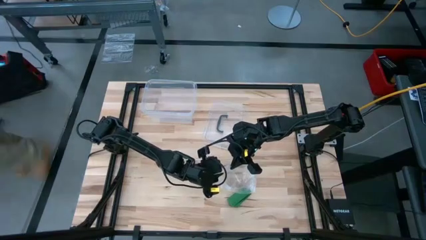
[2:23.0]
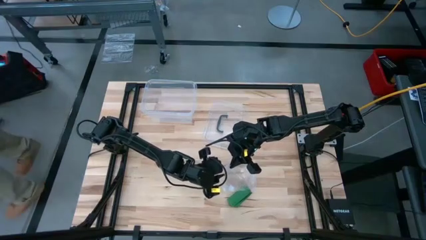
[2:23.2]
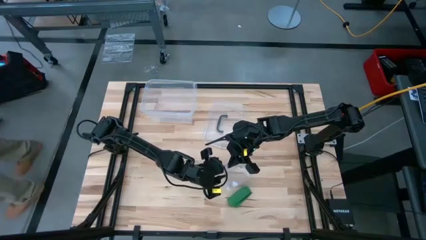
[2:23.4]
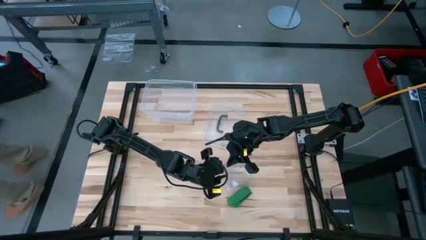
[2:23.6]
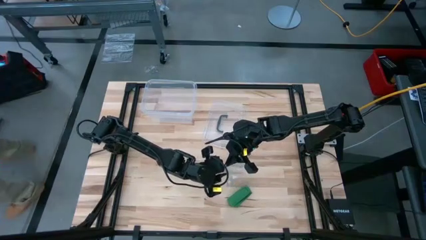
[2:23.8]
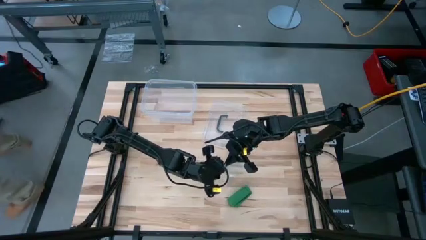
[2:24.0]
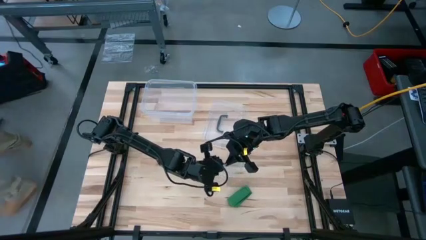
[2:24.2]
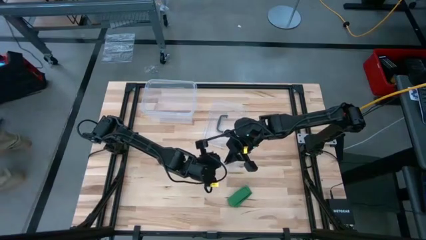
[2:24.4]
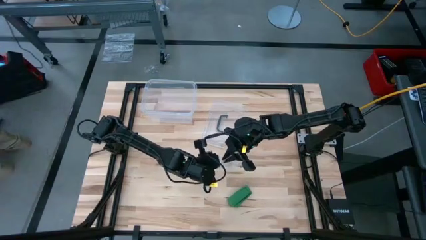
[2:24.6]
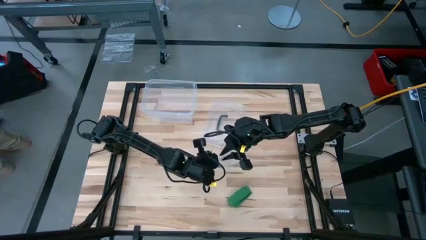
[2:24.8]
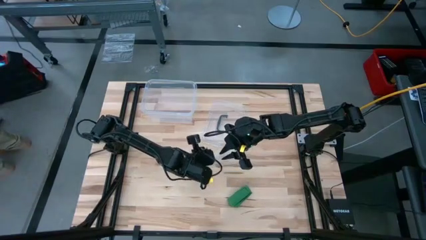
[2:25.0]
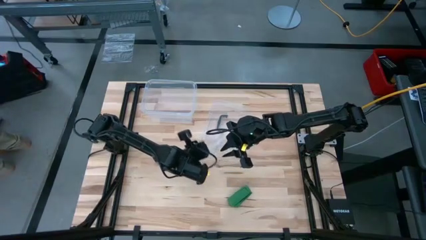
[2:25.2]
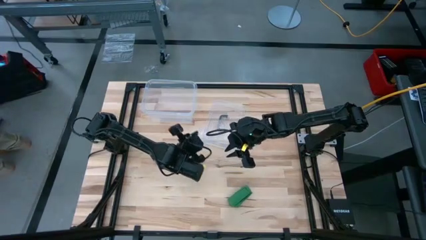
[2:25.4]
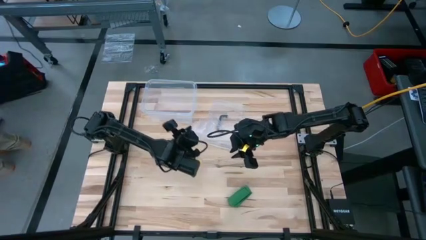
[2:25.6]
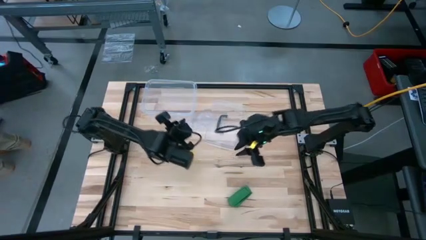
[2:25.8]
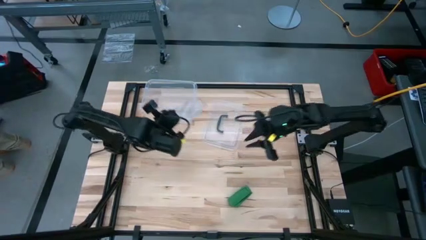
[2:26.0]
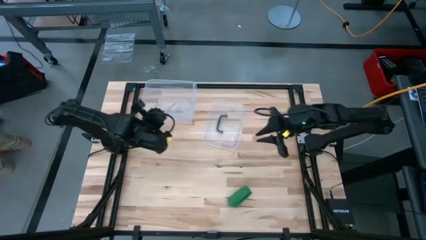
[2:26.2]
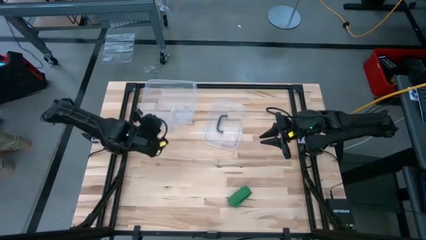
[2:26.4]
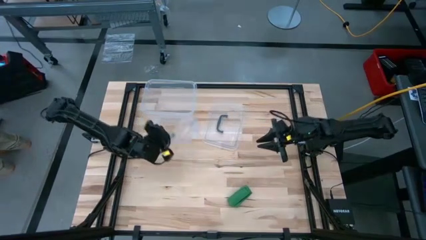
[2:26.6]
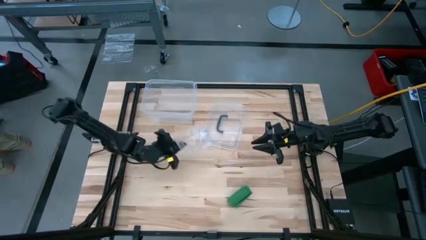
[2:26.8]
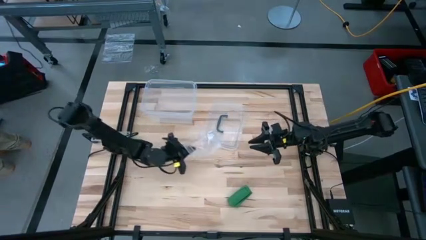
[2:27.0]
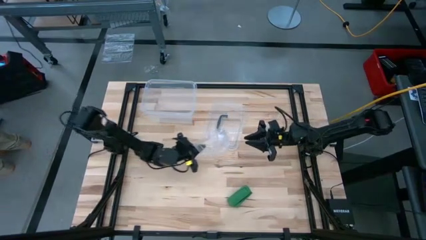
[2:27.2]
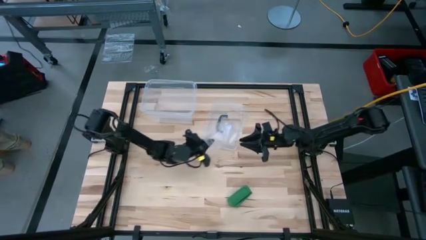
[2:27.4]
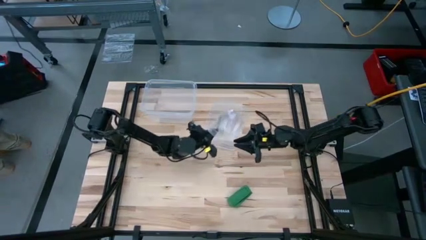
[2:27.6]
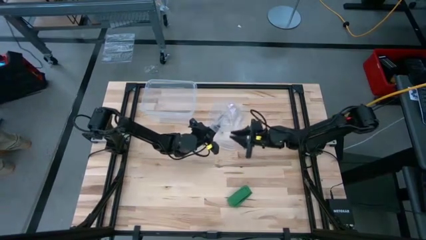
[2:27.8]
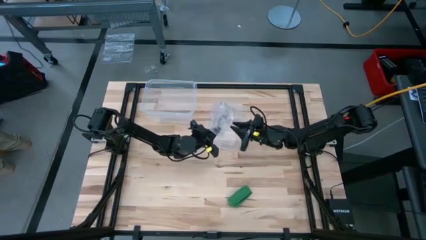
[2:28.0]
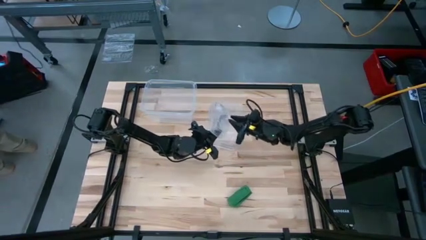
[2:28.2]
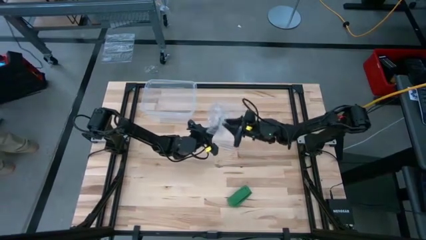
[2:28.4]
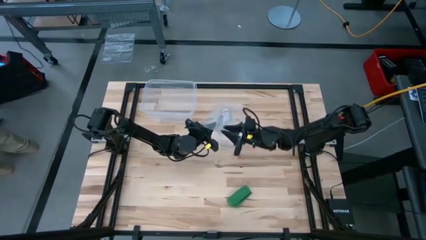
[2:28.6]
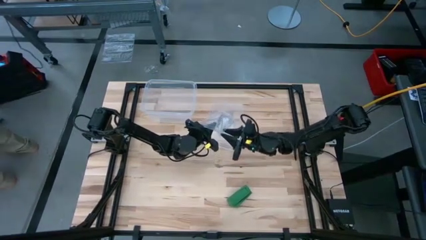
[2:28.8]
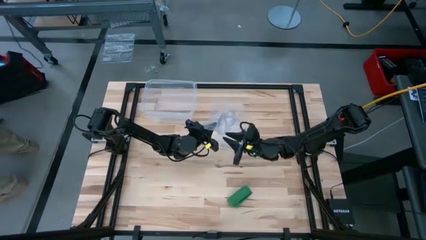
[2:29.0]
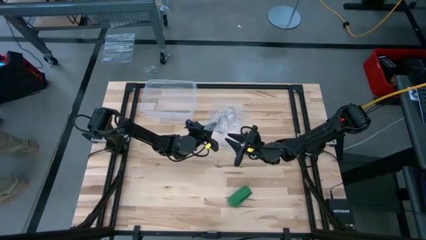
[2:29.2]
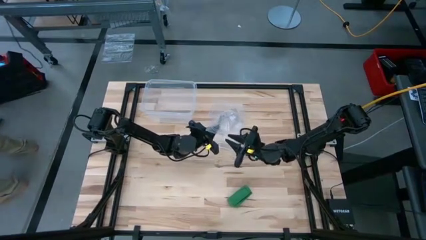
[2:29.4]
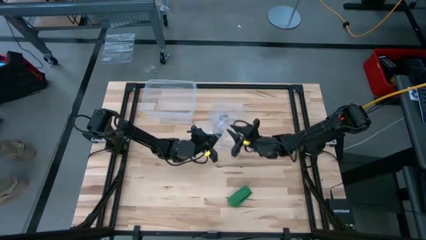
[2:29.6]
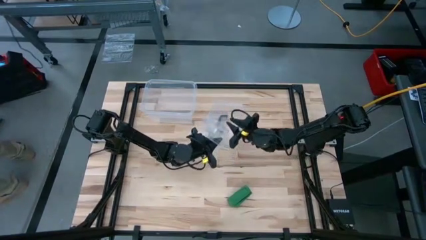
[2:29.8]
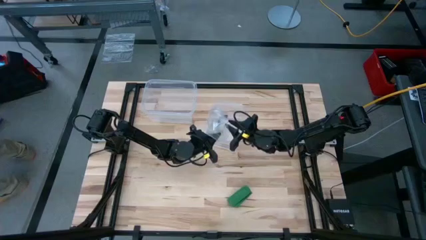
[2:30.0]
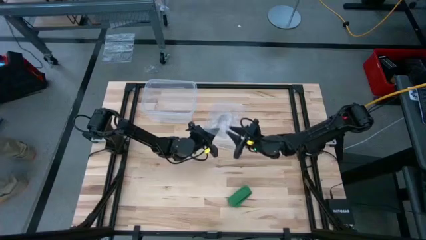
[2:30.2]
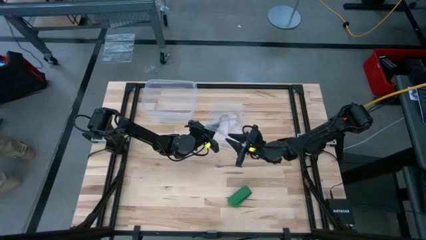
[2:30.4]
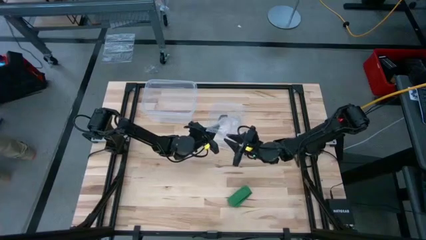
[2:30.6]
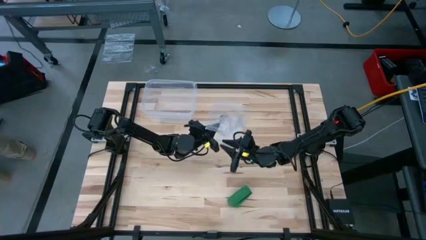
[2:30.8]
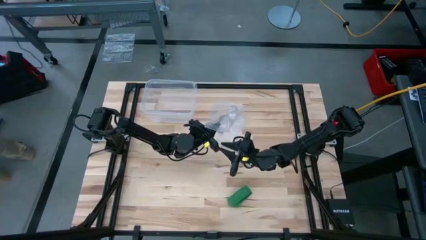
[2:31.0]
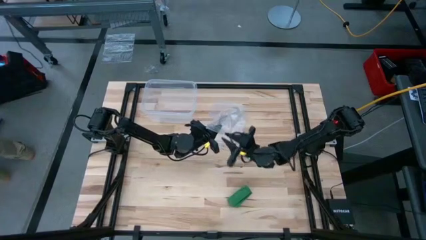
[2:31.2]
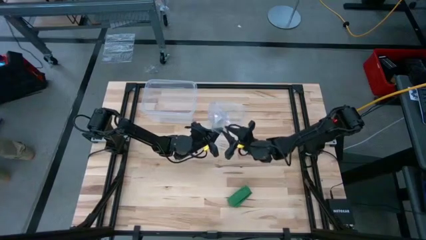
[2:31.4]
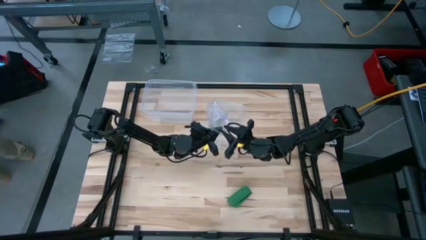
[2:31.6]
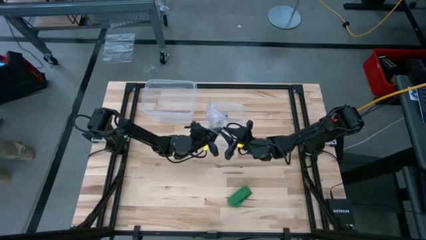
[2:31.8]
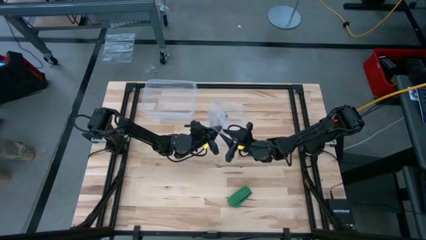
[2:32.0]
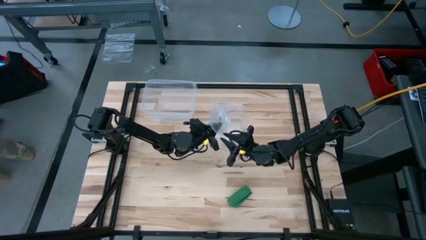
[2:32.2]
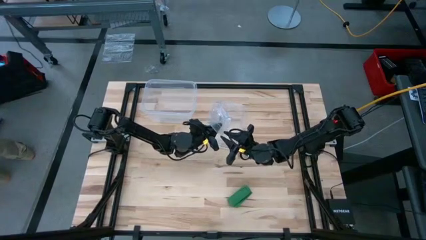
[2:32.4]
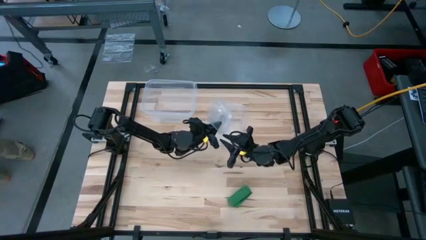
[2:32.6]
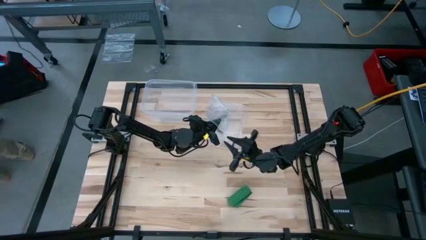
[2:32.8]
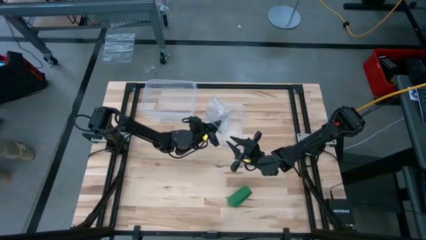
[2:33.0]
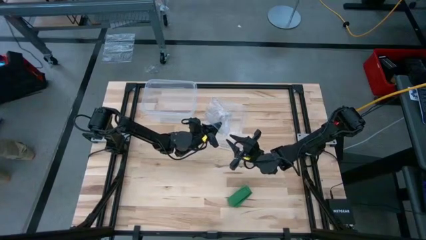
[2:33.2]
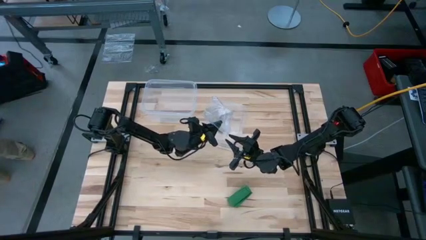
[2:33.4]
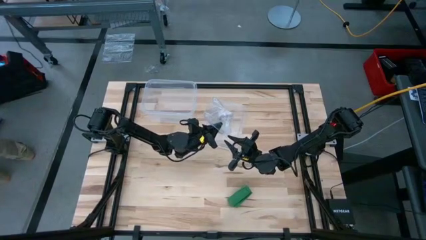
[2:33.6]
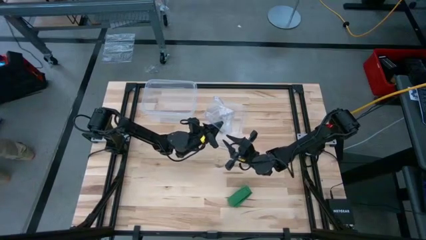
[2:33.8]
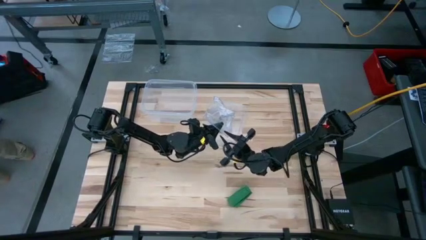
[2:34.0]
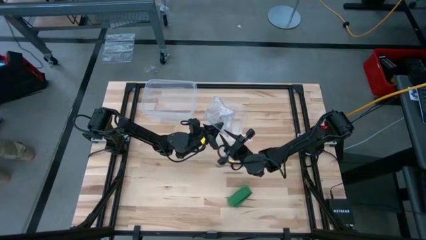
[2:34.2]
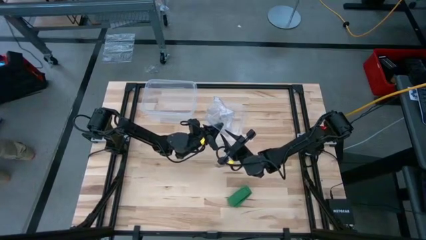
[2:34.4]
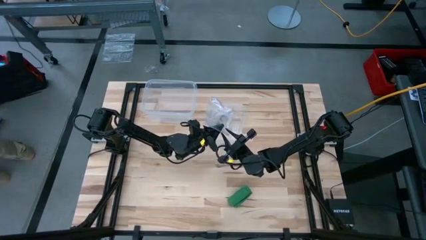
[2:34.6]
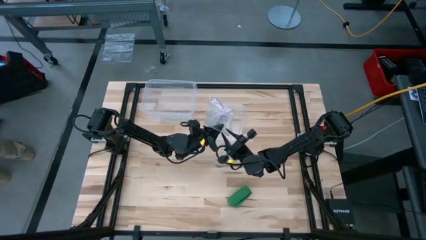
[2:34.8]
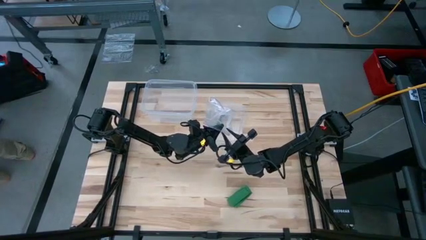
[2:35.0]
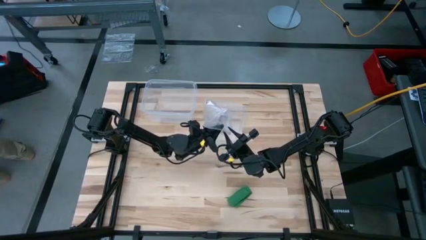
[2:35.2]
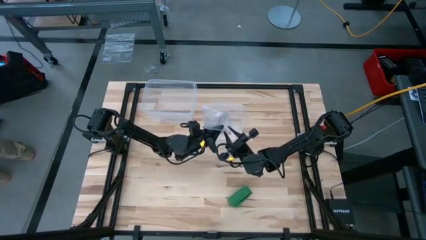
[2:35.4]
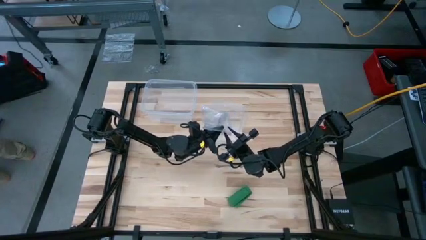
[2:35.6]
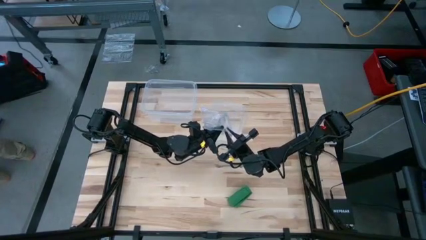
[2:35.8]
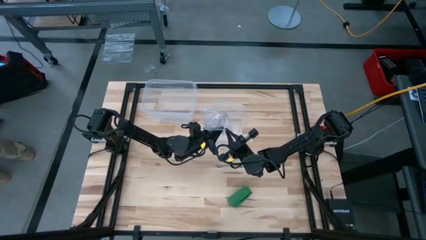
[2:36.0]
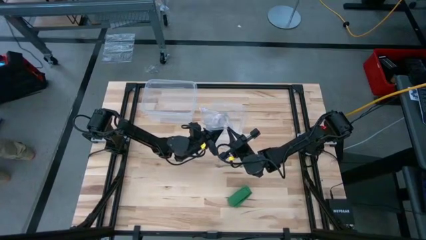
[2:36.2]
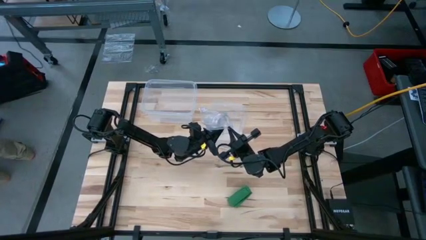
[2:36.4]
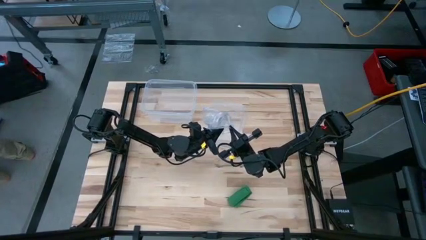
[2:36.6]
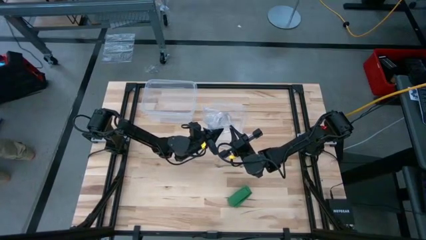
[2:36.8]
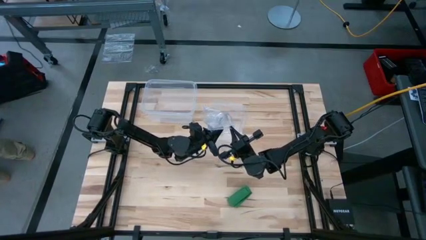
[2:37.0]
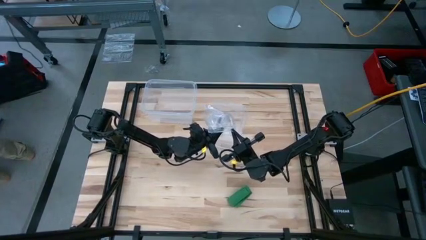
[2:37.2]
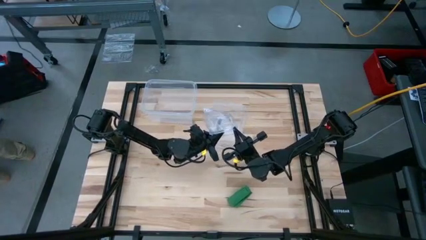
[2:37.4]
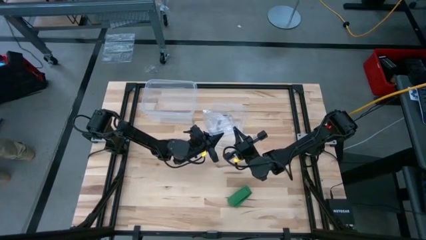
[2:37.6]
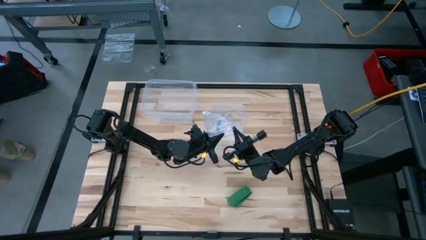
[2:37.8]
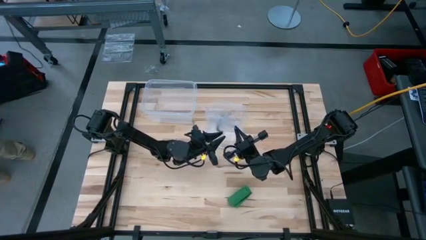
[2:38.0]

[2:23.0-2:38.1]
Task: Roll bandage
Open the transparent zip bag
